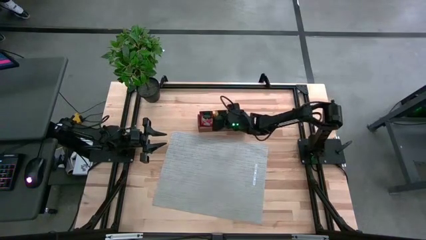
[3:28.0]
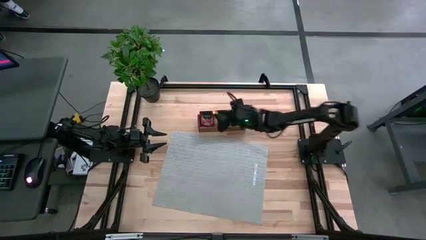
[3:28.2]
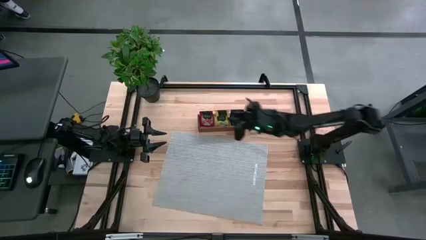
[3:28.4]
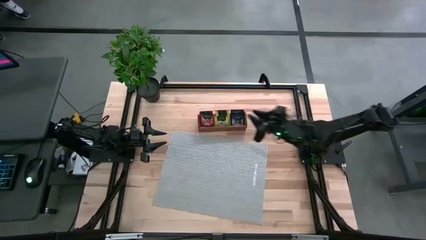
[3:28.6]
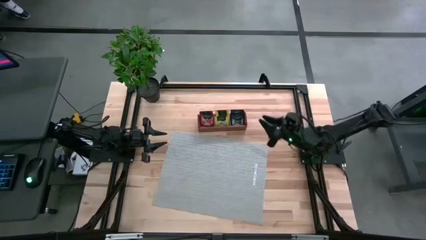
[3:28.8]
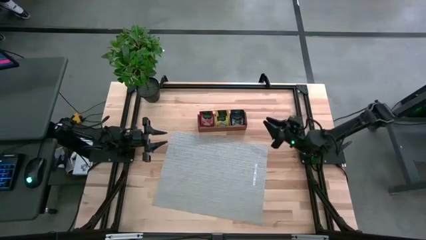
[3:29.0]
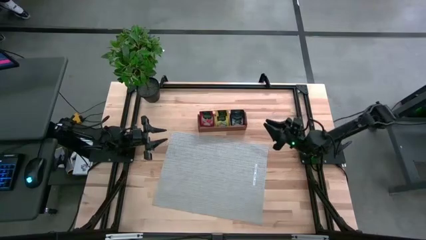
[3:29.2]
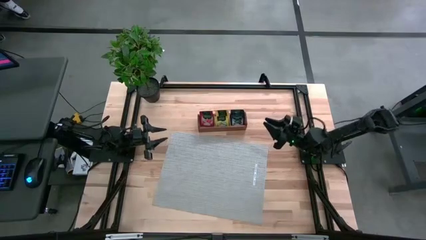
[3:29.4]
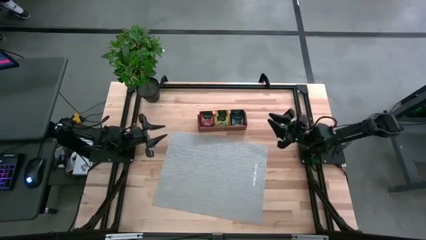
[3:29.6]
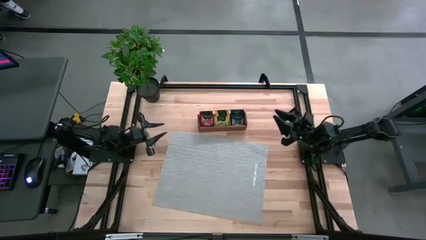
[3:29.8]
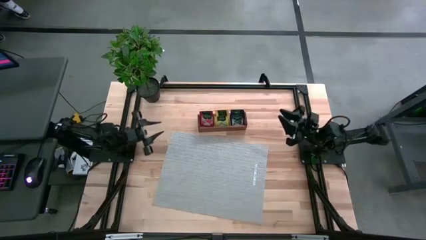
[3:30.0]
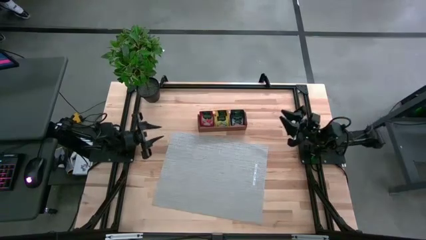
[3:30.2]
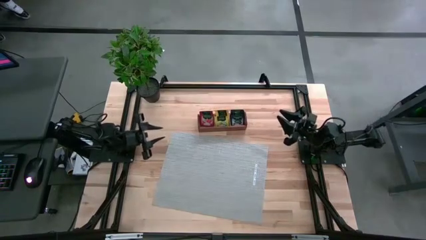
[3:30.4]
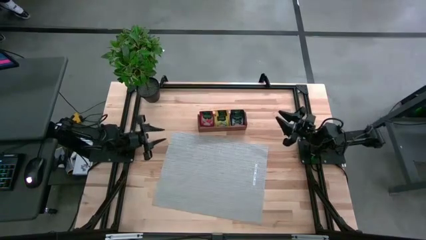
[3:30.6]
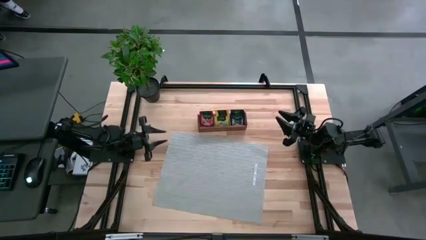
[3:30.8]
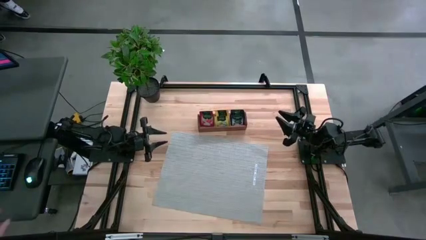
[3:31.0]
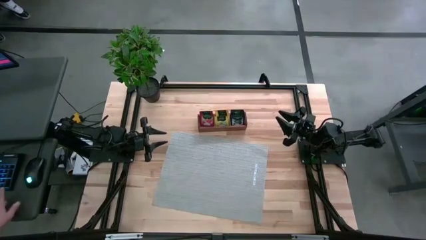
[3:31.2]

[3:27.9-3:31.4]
Task: Pick & Place Tea
Return to Home Position

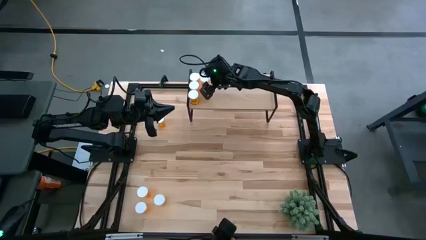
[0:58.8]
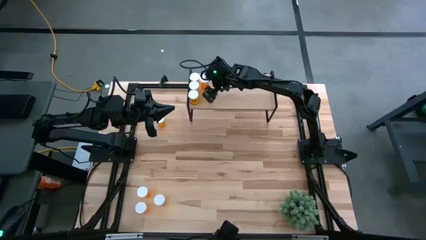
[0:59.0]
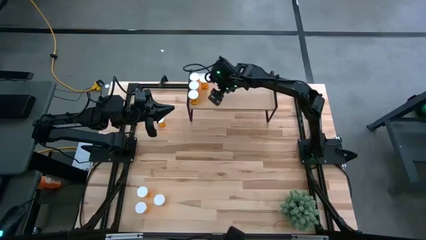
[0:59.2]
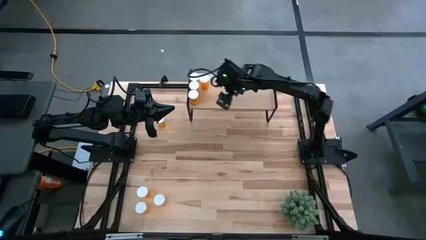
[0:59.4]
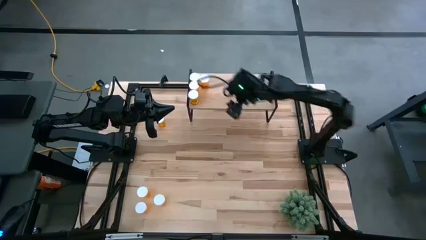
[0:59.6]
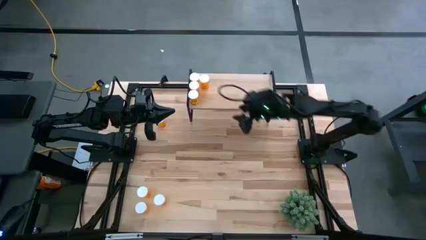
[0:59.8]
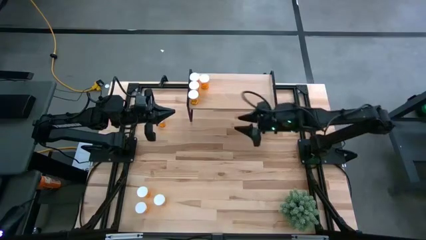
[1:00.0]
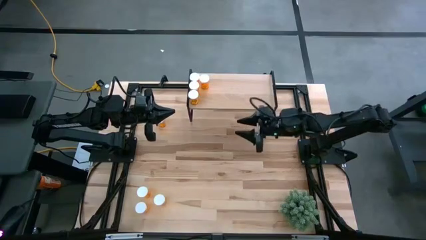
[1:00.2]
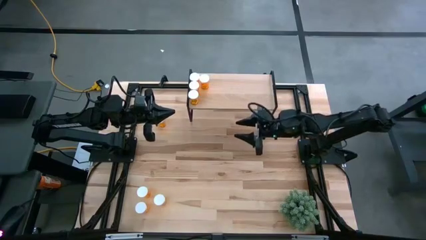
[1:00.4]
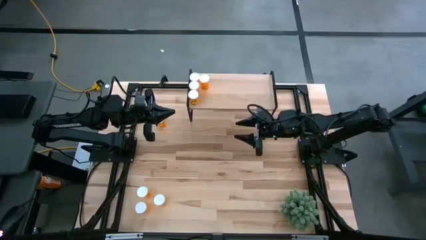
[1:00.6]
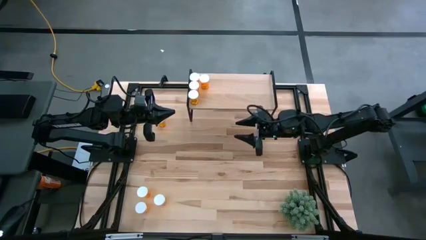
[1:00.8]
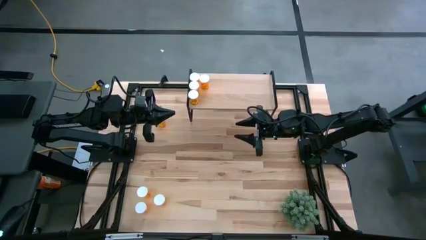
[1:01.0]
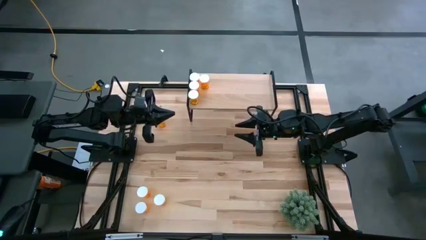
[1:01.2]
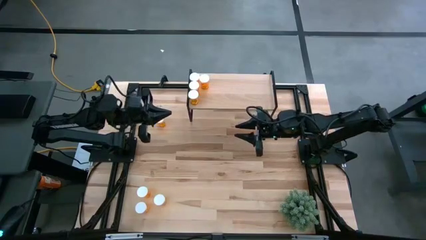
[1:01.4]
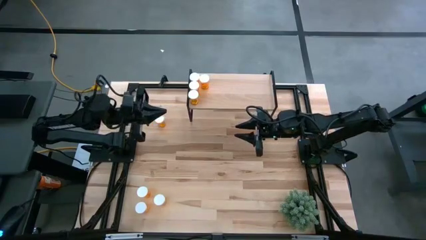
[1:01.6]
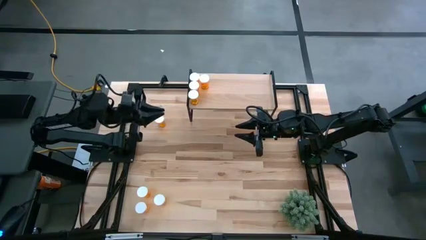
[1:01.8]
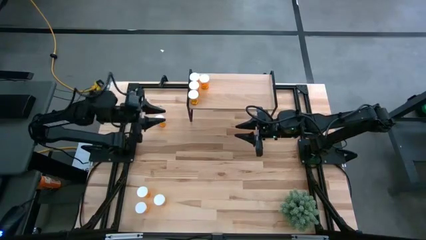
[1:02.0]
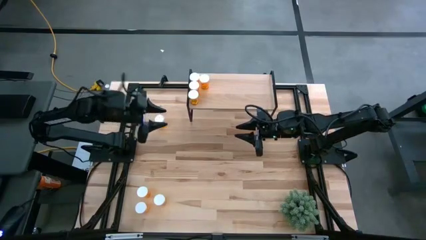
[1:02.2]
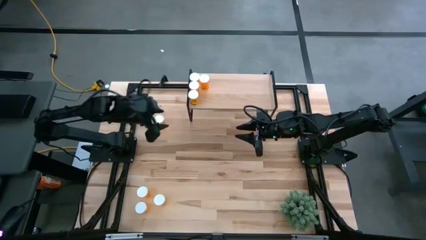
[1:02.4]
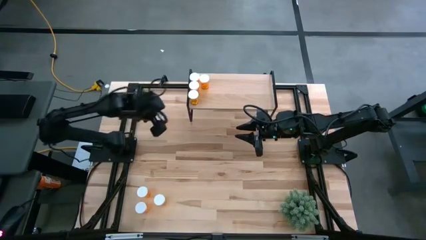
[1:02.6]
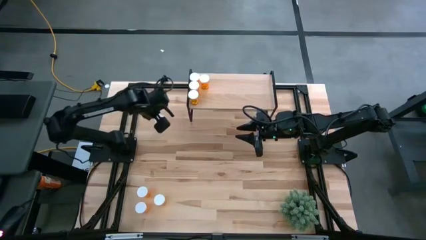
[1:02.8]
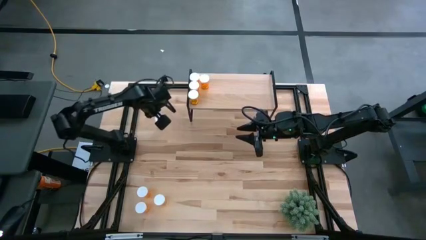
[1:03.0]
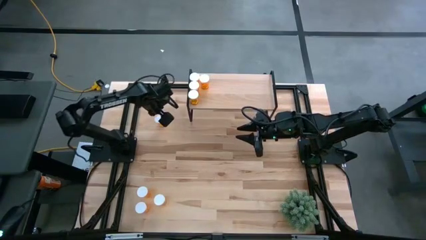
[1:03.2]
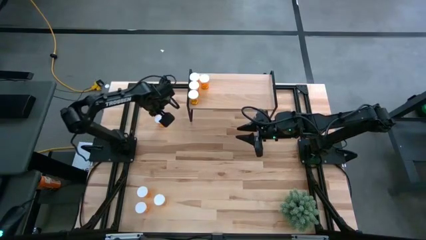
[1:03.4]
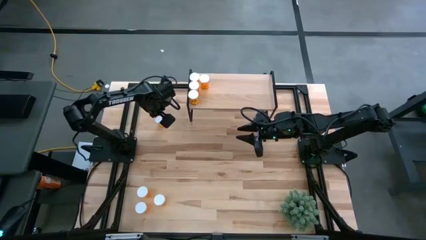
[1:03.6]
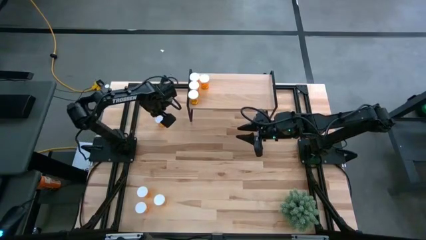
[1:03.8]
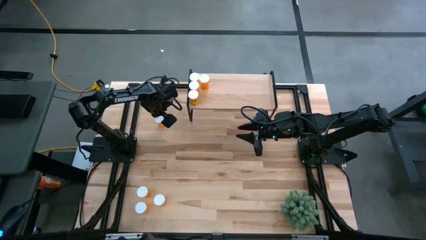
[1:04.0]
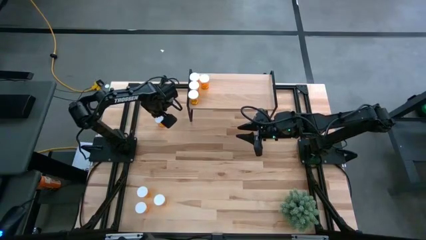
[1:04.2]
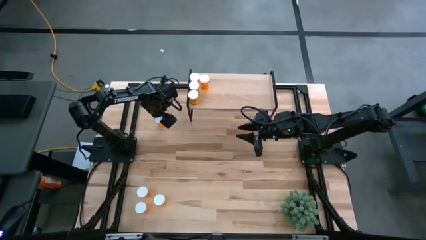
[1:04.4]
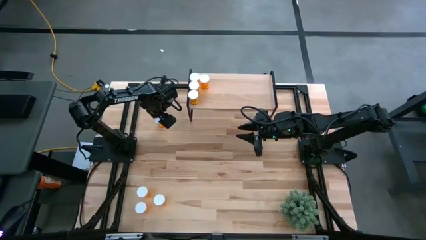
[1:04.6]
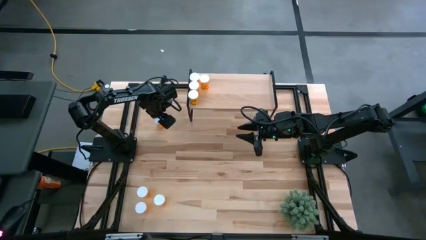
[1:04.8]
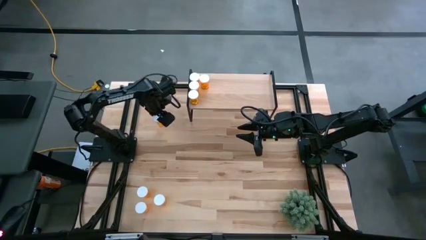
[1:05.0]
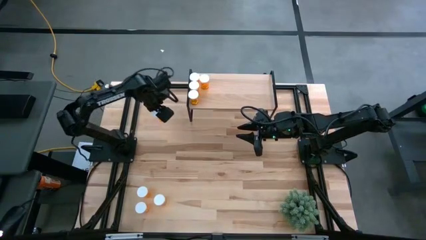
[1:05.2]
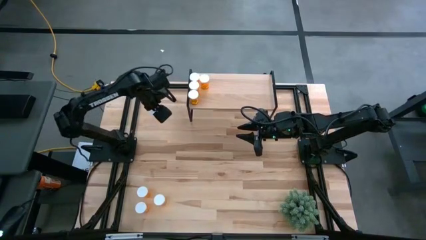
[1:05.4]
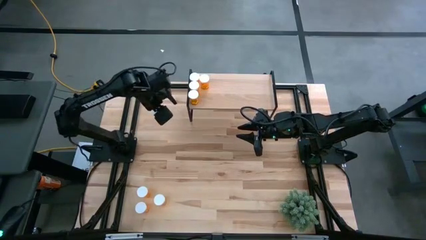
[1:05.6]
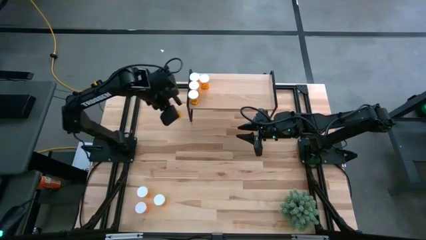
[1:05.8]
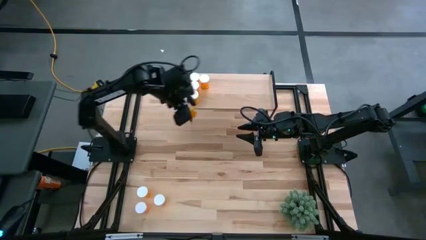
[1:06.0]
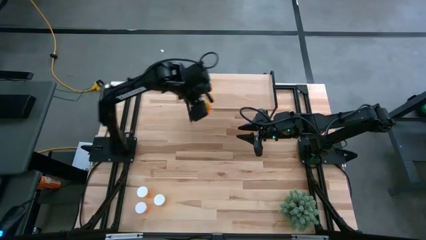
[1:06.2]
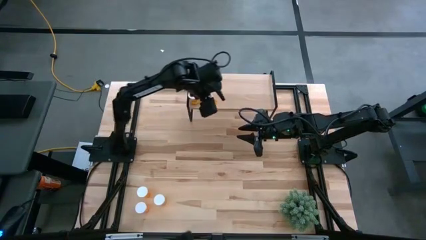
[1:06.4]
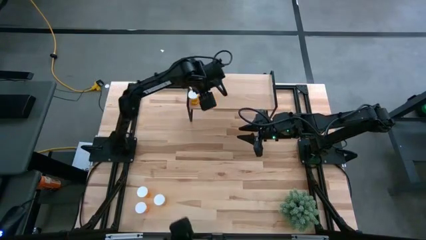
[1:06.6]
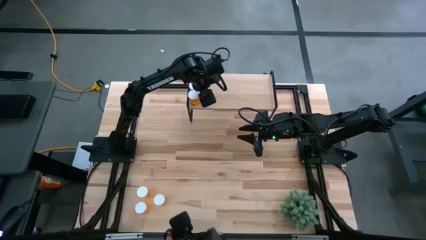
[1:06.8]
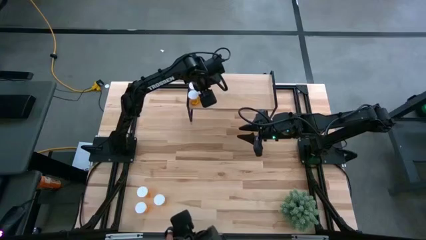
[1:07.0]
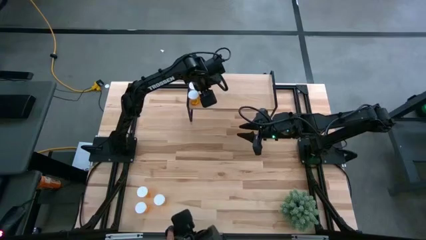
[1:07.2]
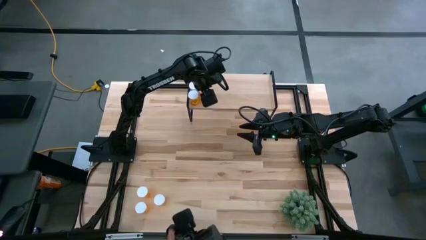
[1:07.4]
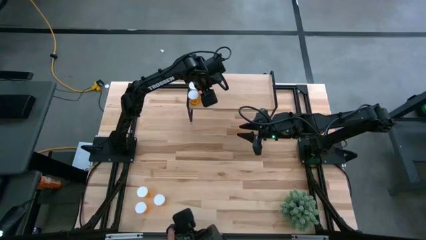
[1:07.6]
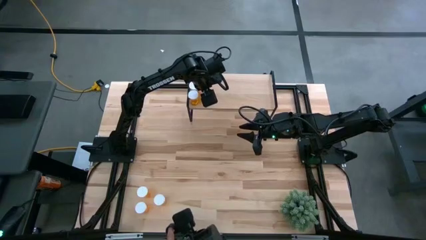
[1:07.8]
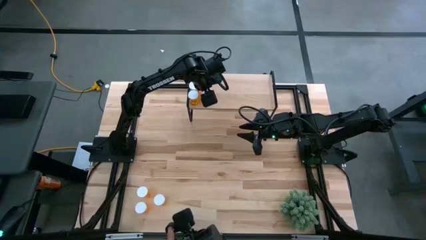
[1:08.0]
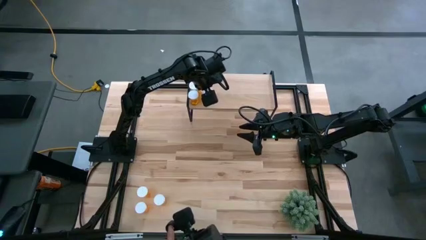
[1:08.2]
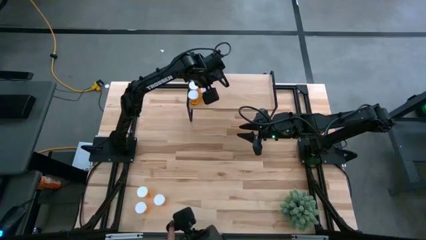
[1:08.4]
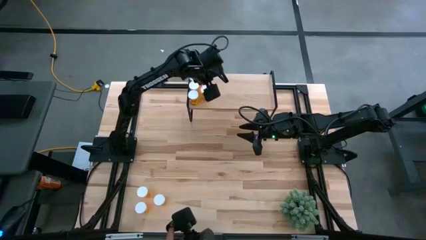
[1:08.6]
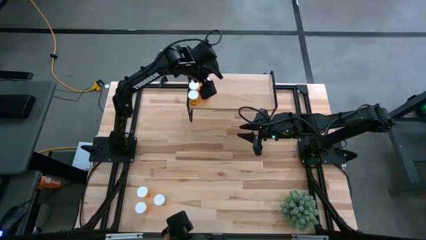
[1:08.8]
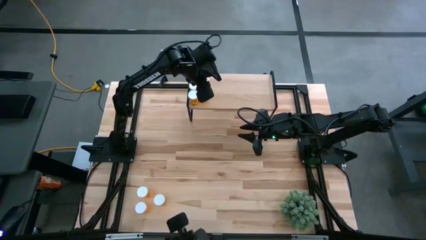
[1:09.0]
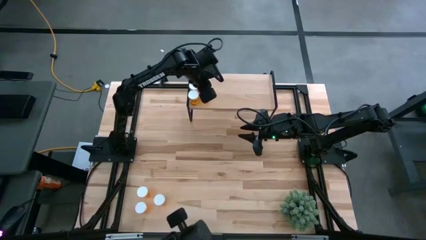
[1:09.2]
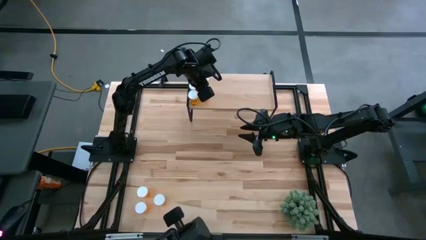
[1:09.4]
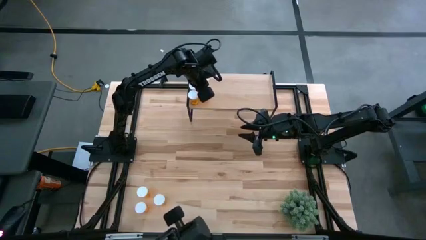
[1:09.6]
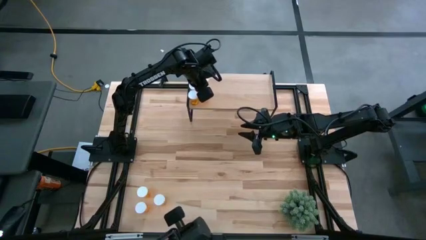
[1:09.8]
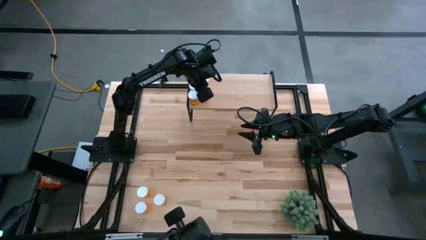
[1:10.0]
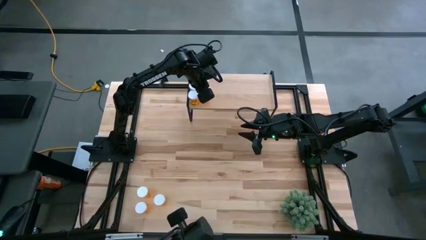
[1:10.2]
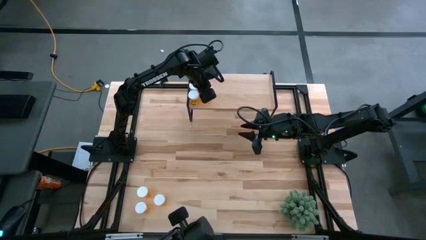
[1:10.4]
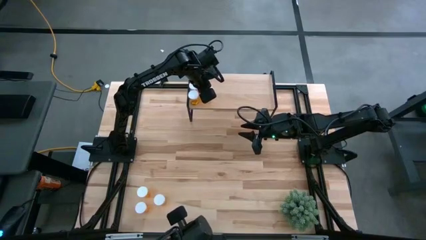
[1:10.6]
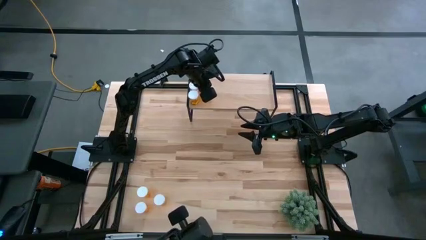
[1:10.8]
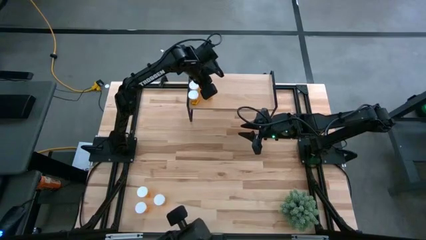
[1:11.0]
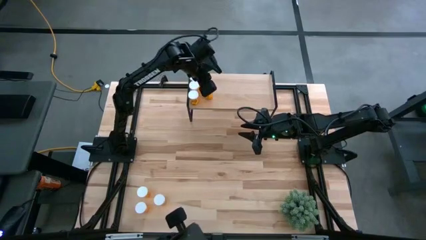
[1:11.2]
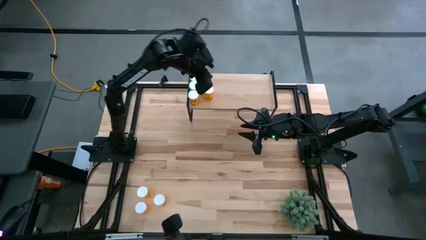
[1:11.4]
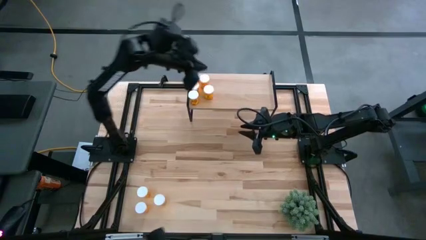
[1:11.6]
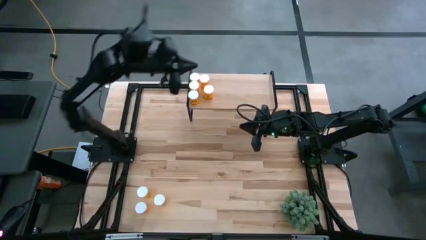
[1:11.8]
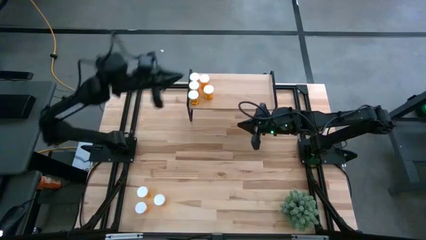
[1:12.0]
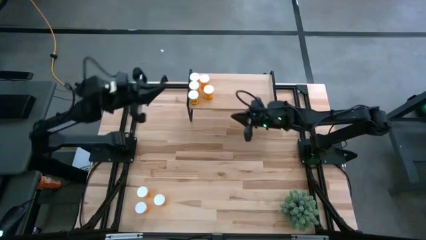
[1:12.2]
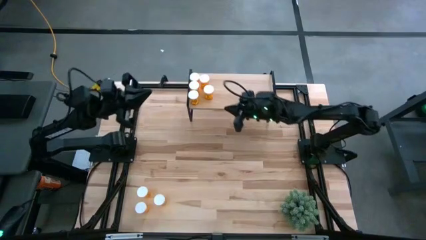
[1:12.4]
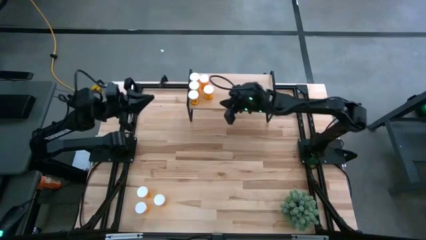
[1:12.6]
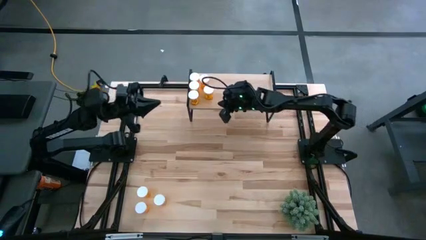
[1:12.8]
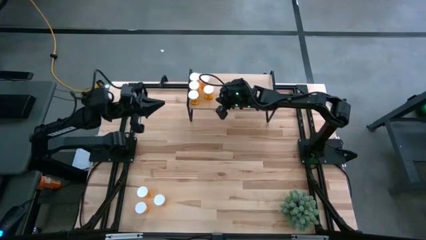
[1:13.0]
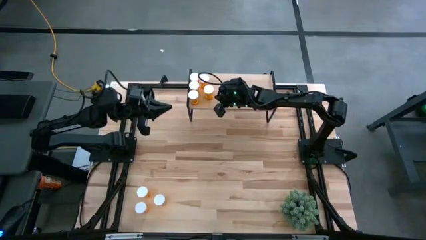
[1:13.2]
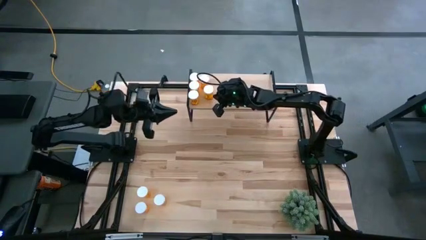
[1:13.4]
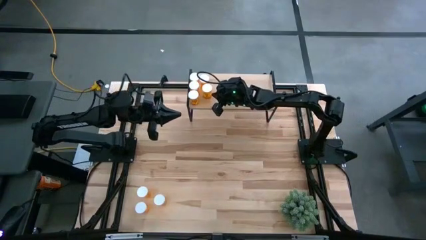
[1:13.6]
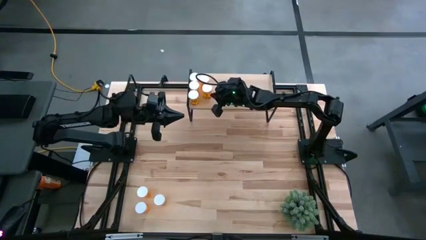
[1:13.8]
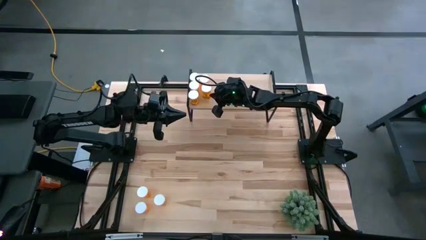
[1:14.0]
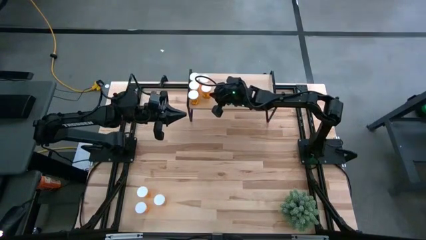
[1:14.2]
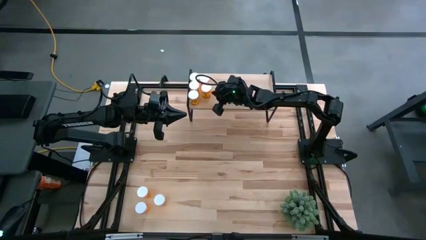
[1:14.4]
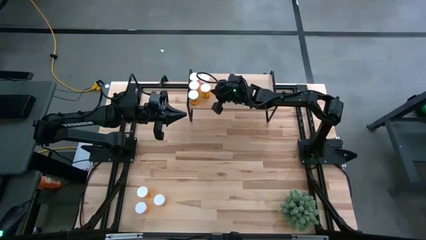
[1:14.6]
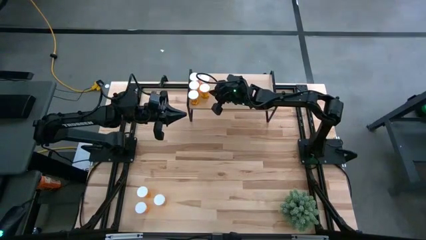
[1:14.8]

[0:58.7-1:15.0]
Task: Pick and place medicine bottles onto shelf by color
Put the orange pill bottle on the shelf aligned with the other orange pill bottle
